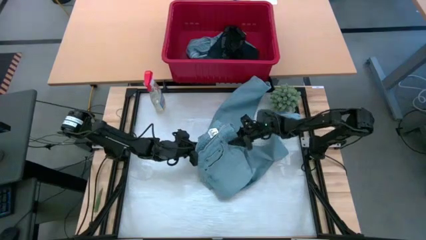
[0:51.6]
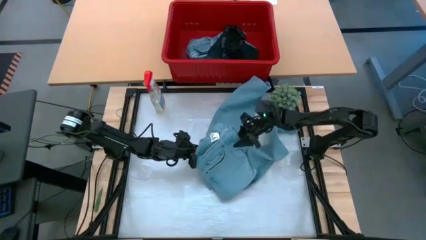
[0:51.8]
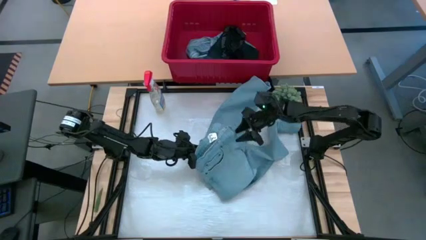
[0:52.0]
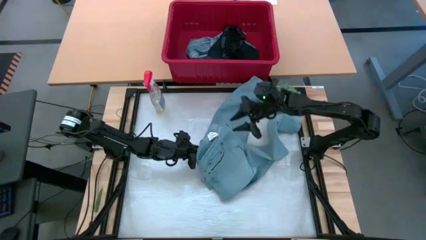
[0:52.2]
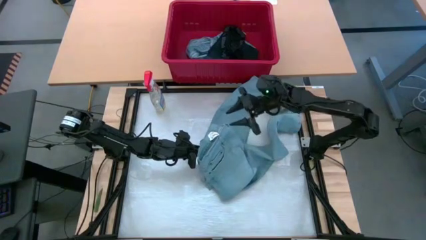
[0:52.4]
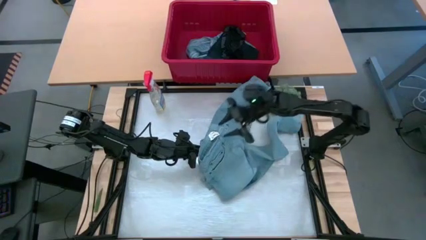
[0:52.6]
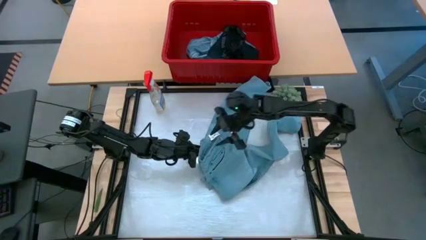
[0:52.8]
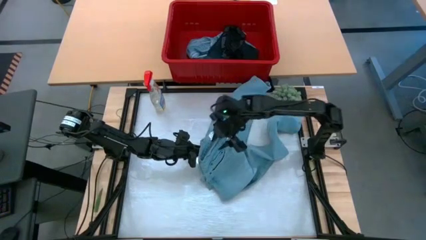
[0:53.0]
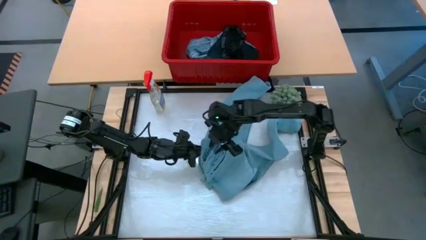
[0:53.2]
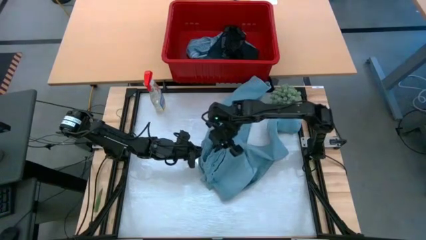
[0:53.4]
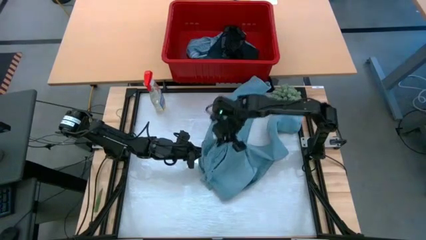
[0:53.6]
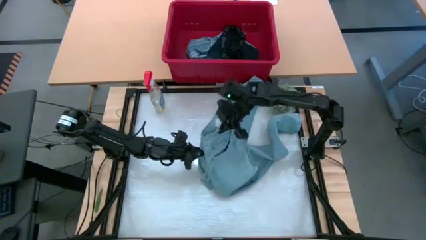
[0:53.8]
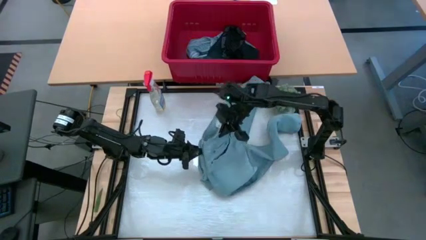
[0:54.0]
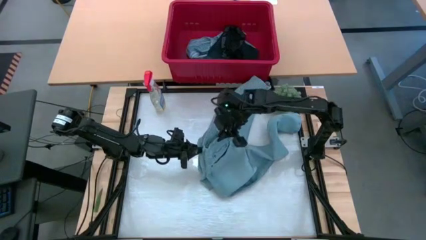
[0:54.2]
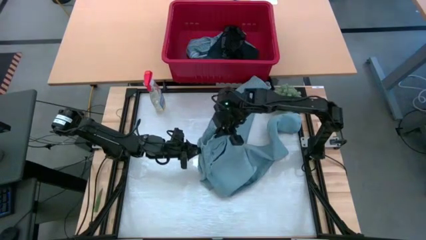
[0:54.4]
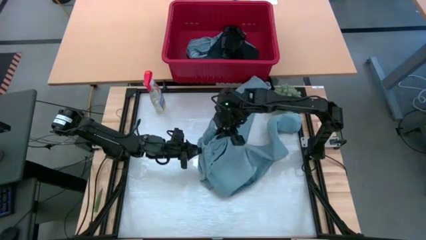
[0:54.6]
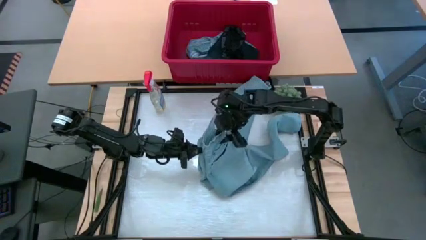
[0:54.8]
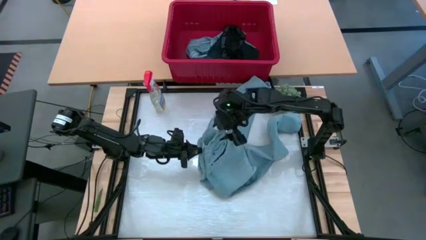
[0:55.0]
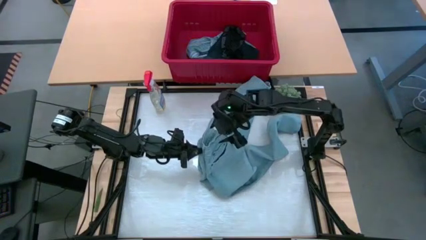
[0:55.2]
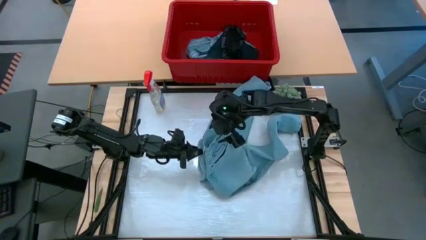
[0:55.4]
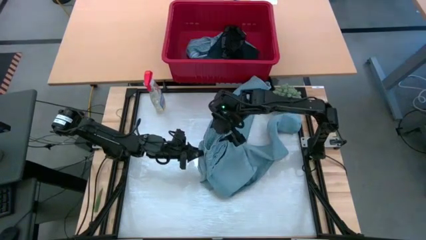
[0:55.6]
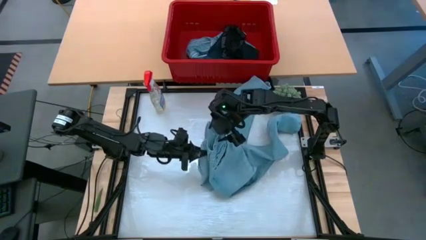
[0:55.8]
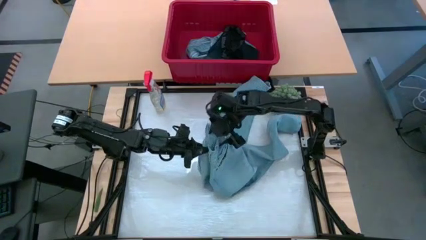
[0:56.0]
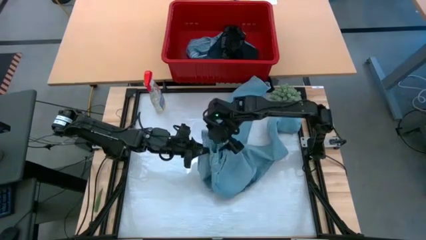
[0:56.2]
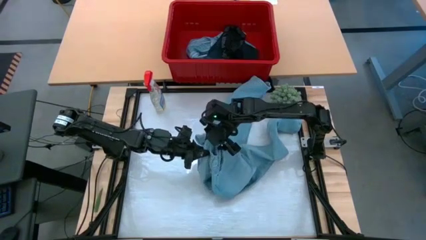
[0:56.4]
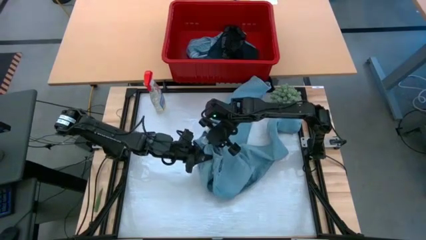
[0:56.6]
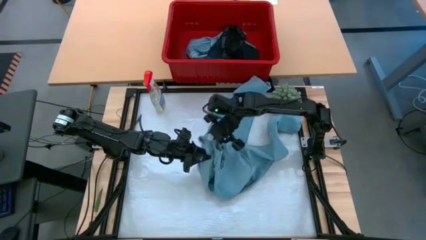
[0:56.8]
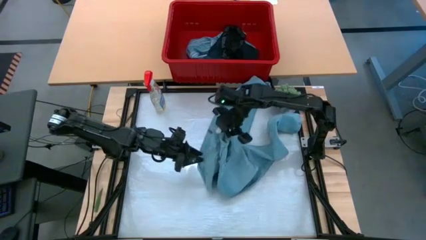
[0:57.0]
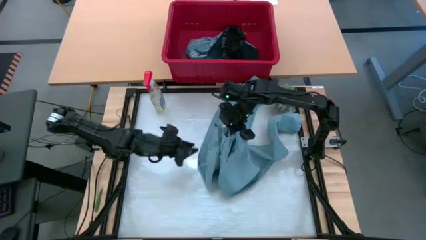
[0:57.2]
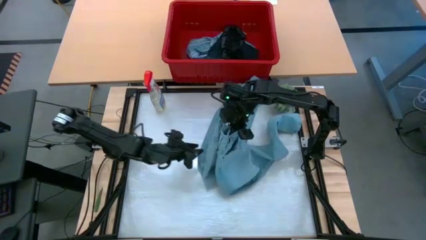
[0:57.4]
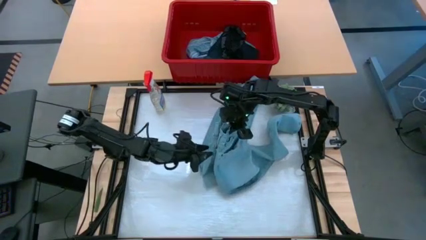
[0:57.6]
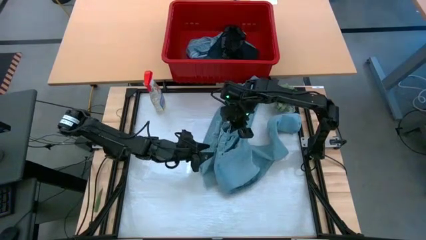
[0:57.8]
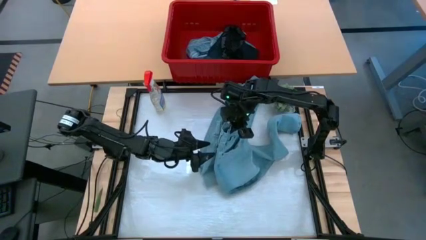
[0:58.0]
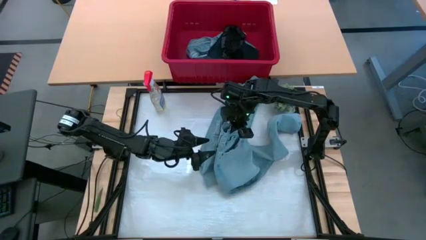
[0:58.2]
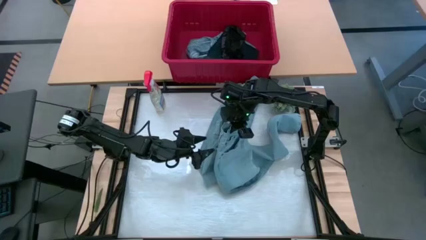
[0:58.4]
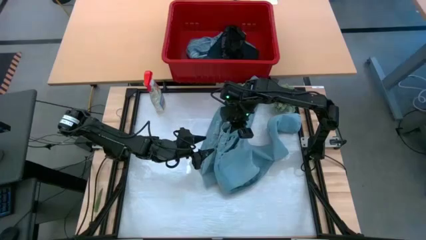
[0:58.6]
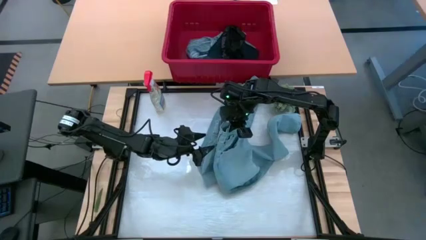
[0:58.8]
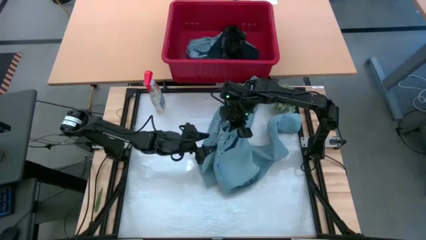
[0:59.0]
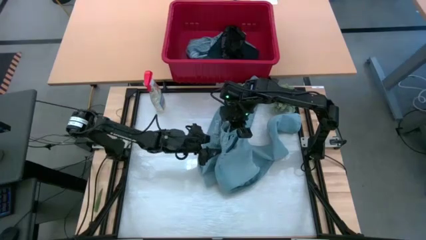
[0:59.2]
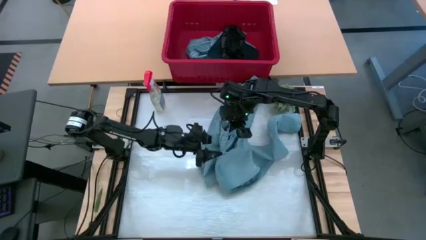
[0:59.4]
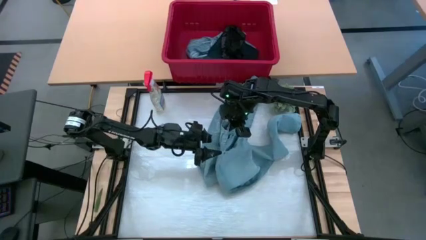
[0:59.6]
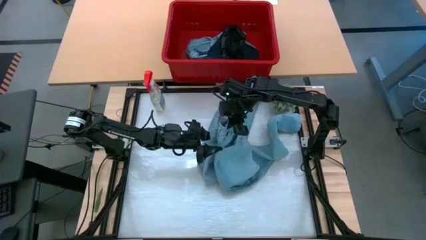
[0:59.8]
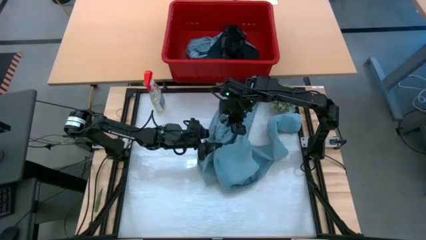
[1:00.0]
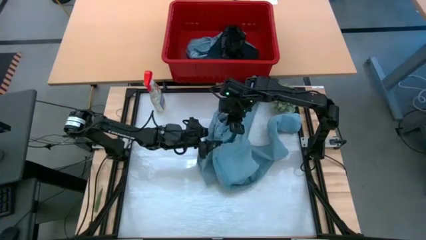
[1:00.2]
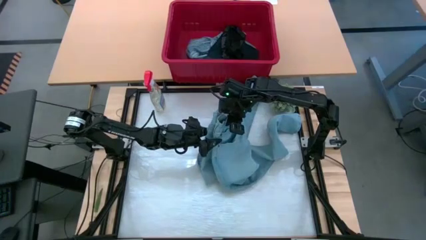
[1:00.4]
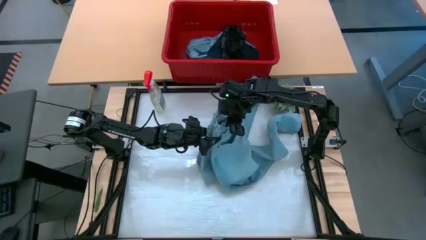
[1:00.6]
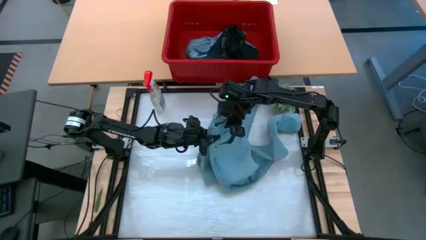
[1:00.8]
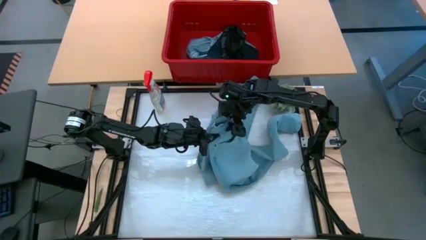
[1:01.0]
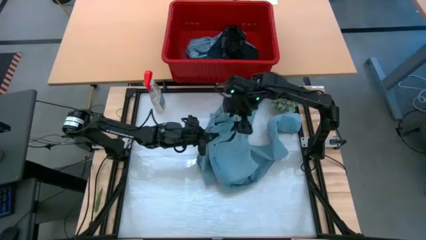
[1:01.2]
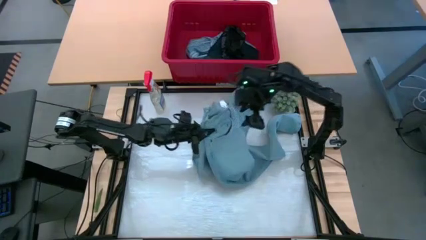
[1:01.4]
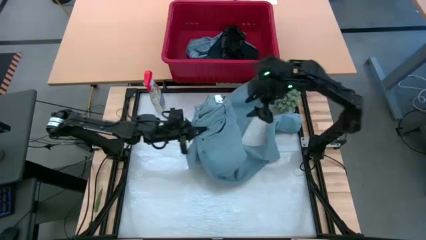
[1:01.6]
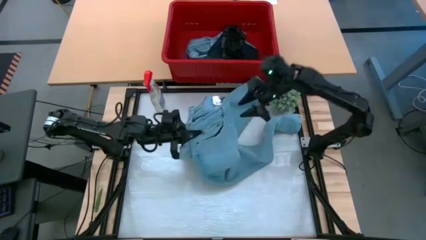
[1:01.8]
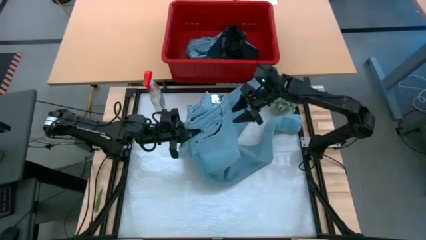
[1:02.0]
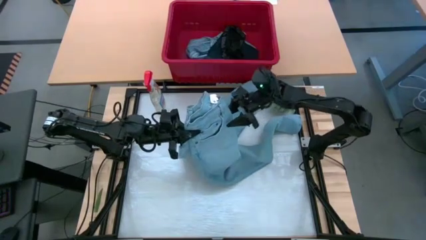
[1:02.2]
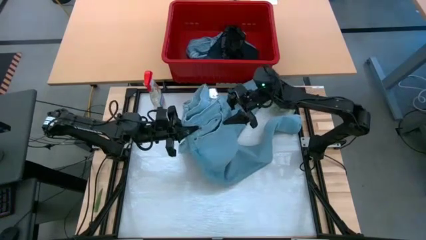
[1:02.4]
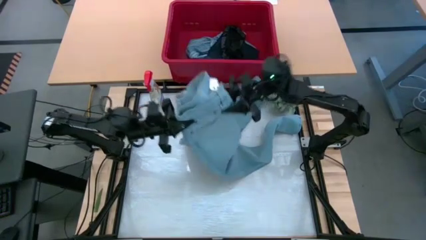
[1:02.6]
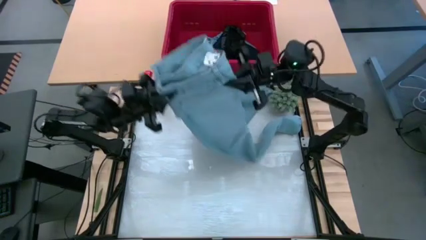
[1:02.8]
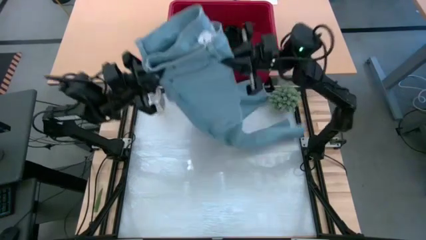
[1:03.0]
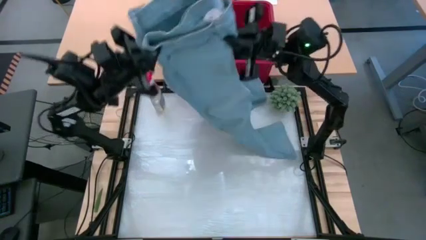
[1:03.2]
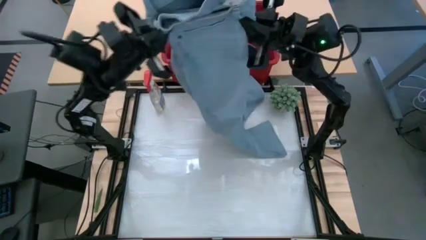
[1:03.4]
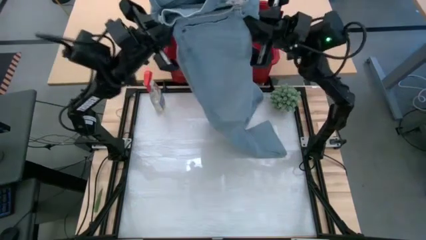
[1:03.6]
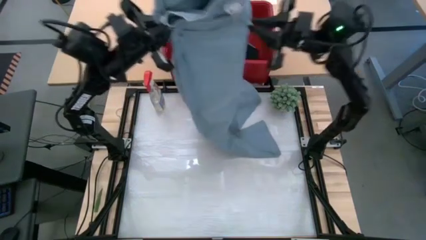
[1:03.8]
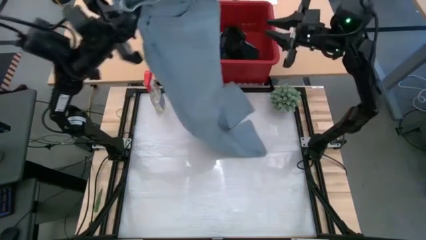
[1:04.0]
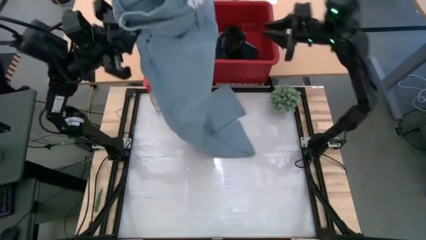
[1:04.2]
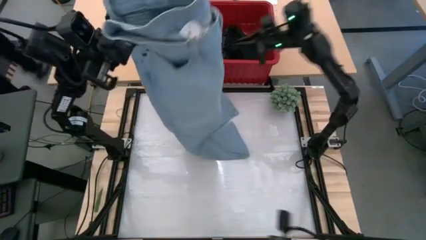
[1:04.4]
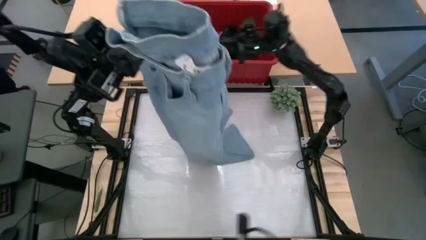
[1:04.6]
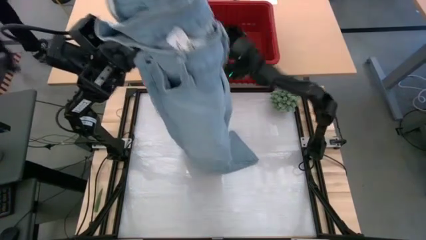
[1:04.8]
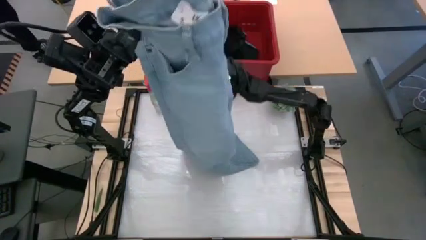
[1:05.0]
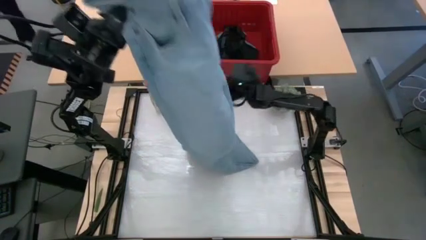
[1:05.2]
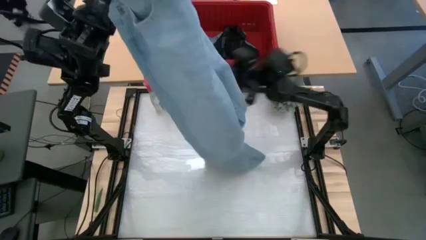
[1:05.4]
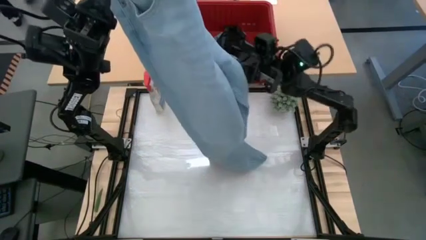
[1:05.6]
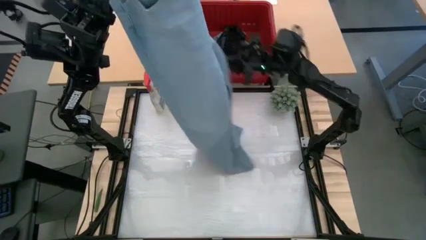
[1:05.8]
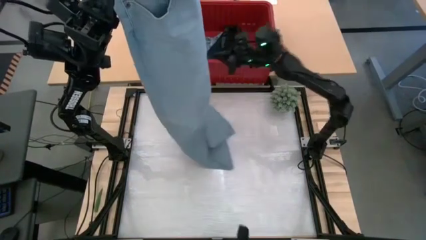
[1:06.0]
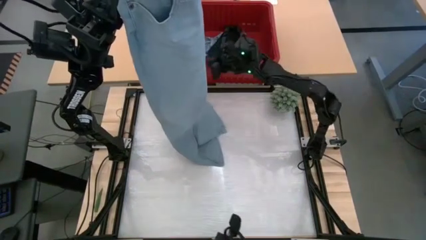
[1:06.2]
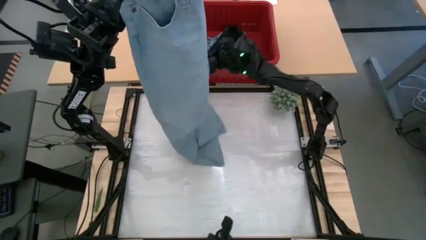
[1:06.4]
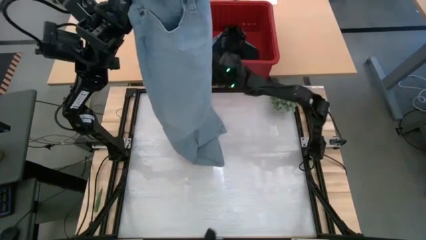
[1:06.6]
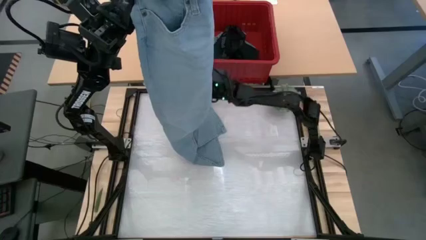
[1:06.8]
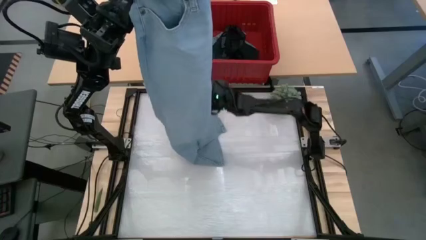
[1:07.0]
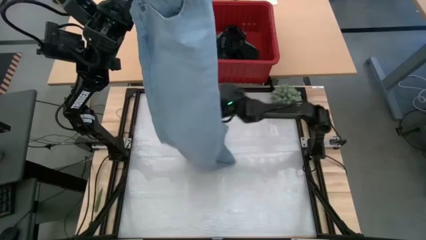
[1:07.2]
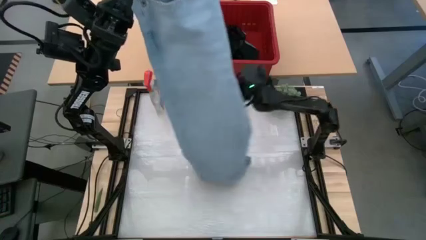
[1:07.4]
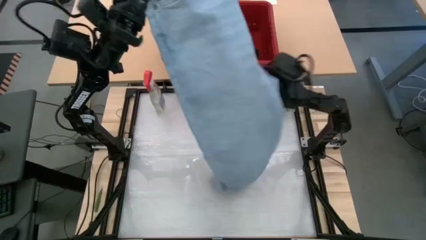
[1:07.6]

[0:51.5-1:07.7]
Task: Fold Laundry from Bin
Fold the blue pants from the red laundry bin
